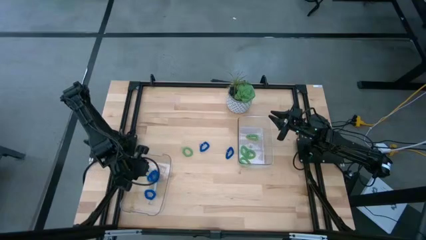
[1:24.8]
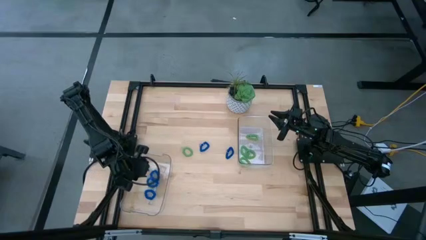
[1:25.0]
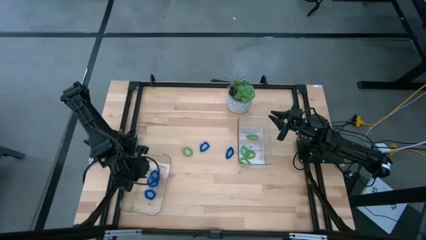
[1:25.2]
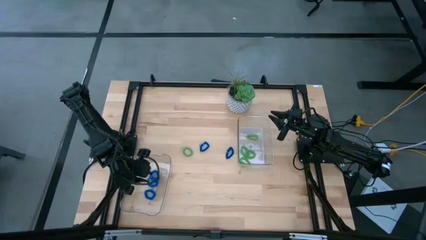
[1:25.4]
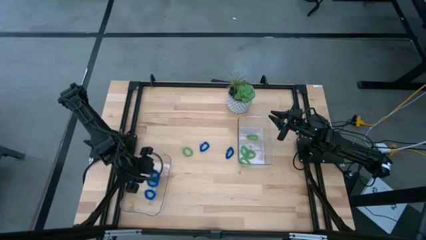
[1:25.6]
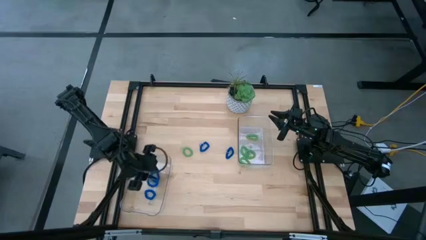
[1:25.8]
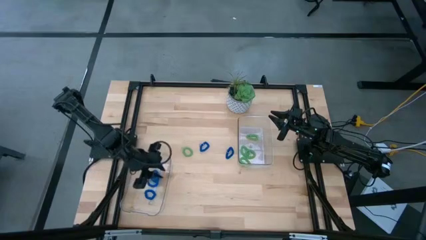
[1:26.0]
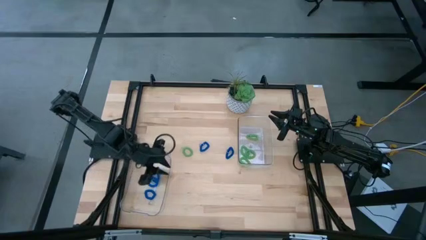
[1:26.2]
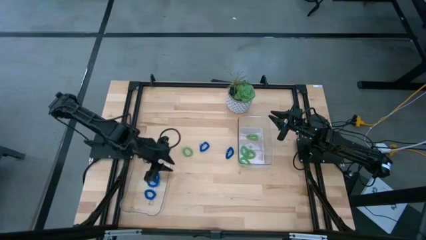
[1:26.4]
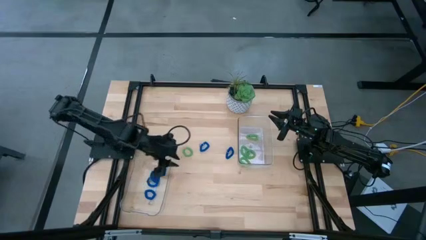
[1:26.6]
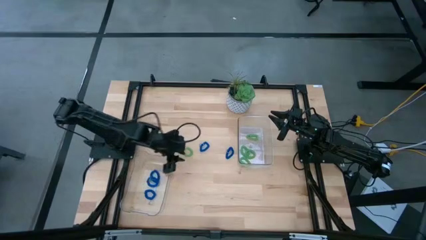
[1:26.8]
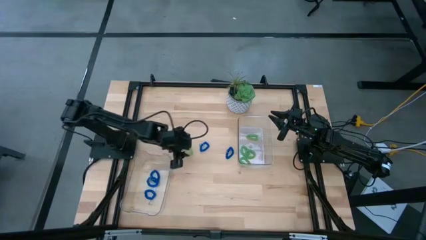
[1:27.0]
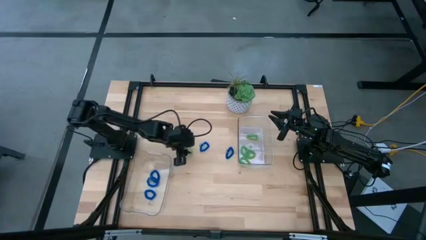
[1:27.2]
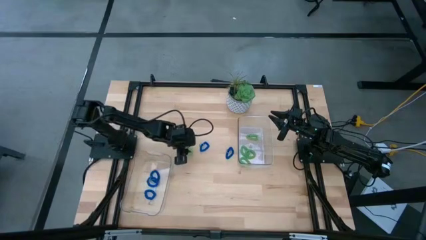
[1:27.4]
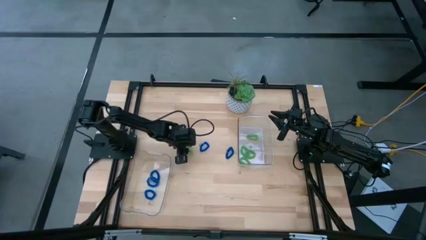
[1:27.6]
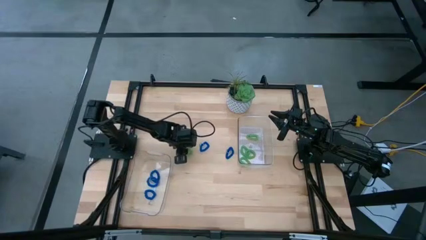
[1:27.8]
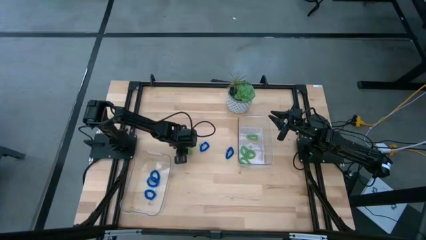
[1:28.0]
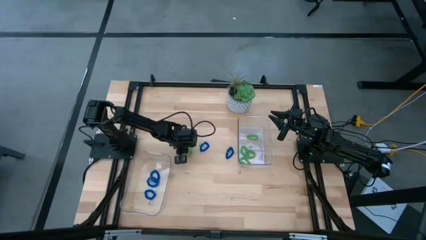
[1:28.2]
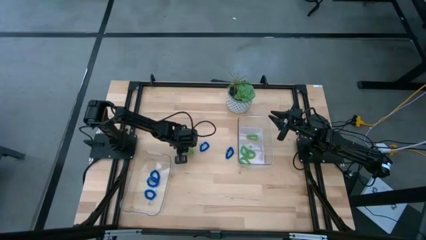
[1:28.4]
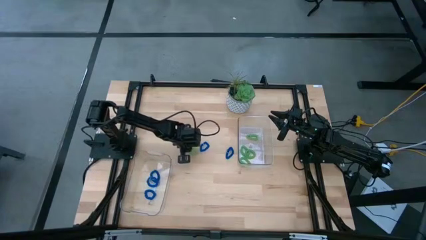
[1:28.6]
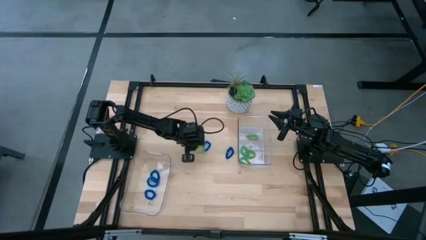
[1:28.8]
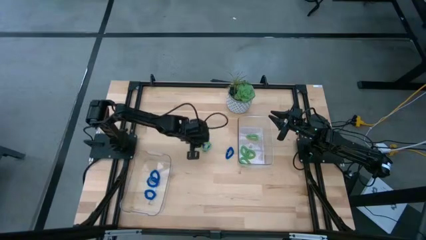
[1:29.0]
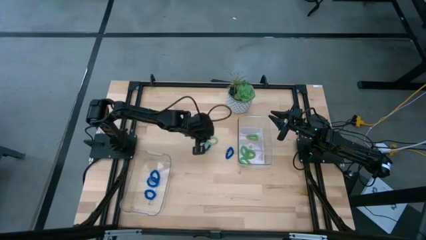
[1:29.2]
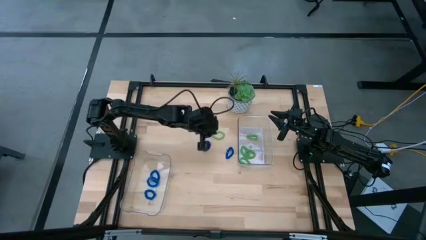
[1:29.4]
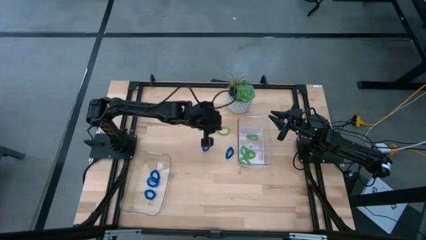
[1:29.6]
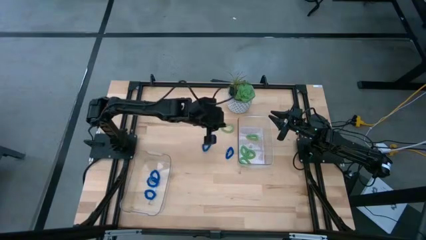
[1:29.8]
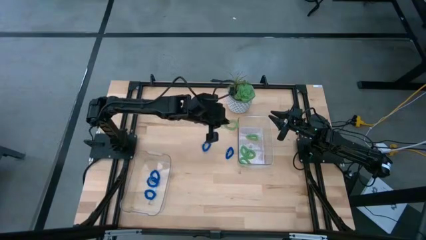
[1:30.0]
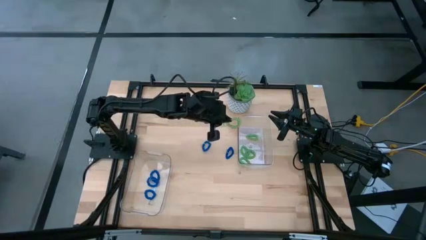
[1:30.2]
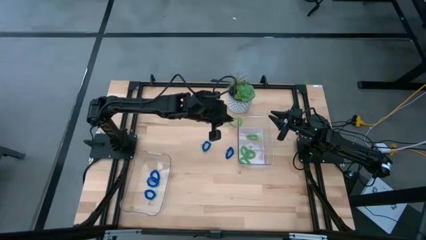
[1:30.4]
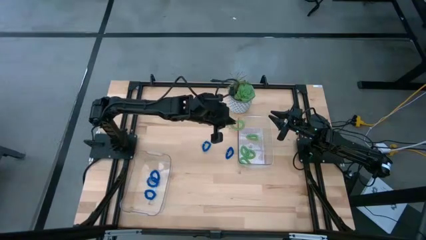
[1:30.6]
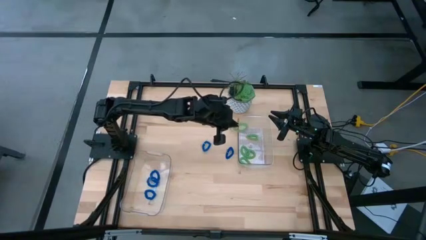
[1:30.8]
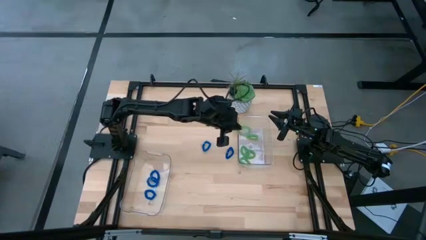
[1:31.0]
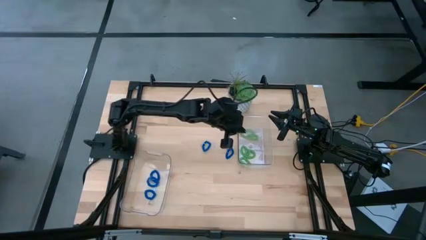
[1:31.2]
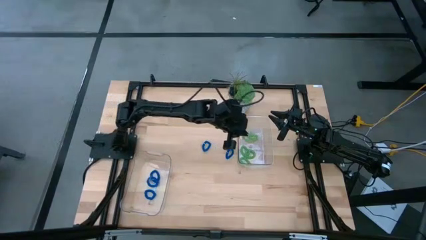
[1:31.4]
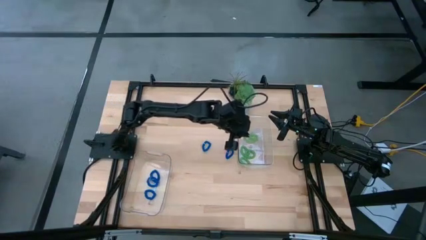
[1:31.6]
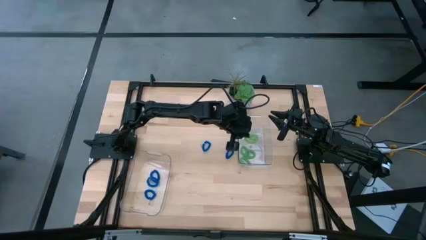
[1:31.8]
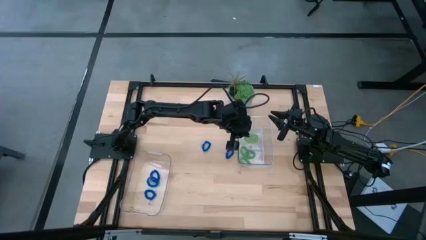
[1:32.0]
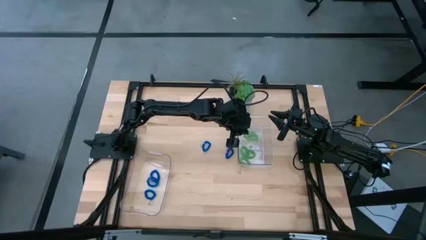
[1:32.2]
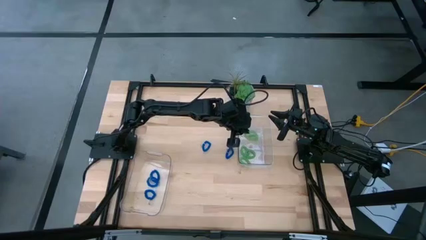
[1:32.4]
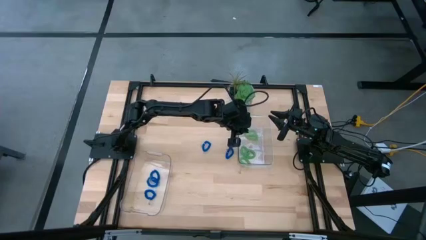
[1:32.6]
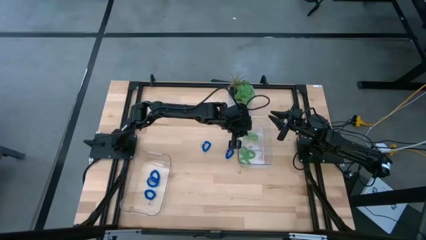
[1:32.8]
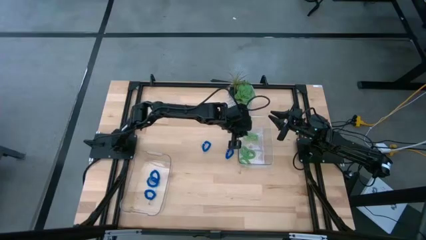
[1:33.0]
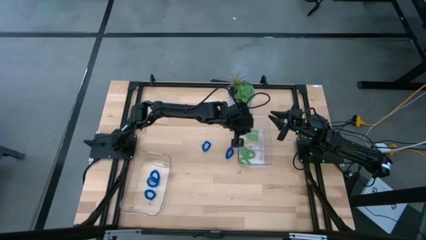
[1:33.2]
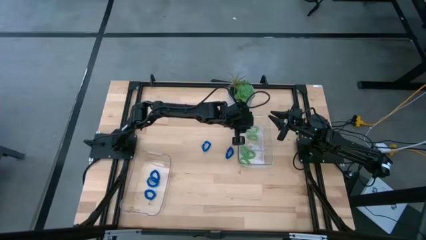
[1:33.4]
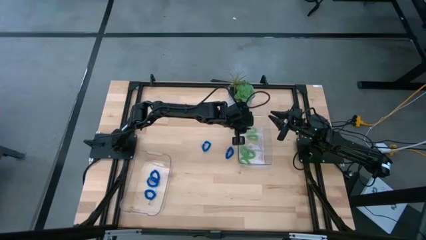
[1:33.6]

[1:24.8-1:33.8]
Task: Sort spring keychains
Put the green spring keychain into the top transparent bin

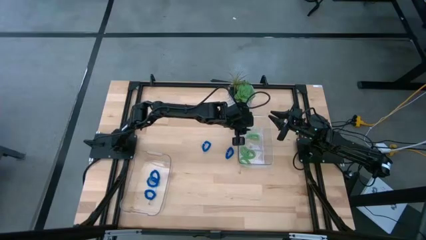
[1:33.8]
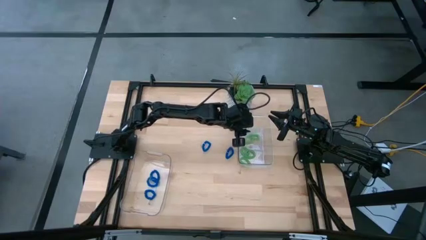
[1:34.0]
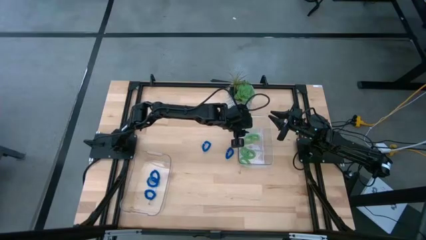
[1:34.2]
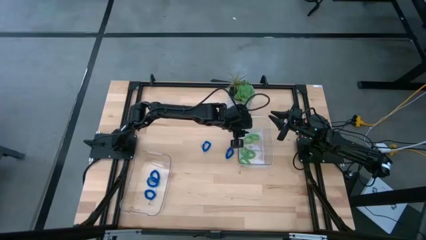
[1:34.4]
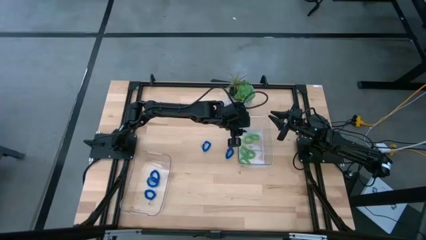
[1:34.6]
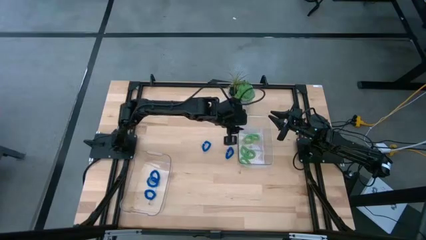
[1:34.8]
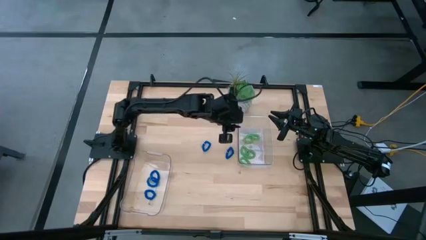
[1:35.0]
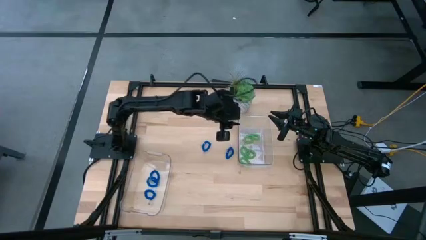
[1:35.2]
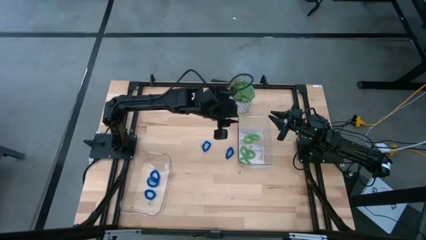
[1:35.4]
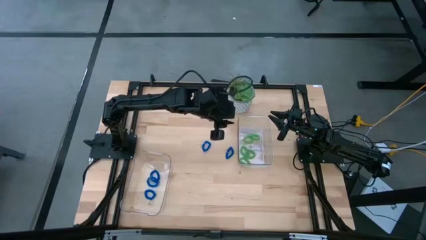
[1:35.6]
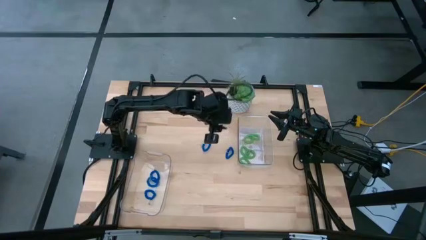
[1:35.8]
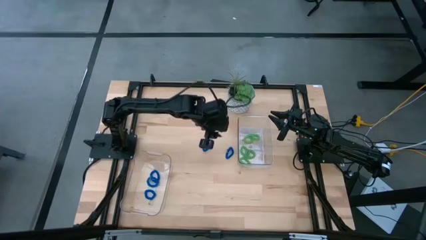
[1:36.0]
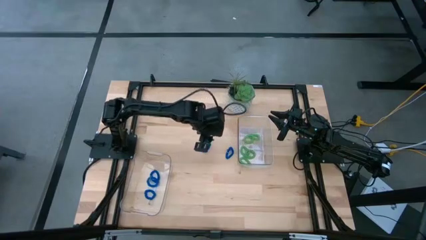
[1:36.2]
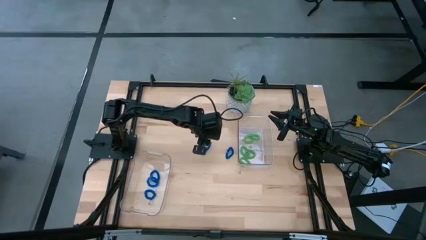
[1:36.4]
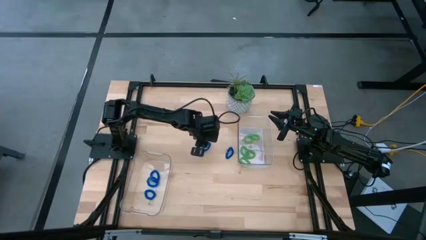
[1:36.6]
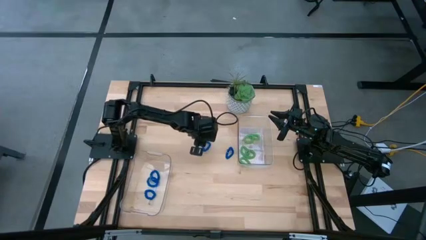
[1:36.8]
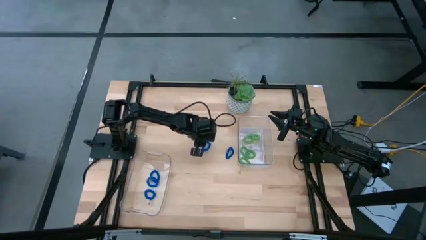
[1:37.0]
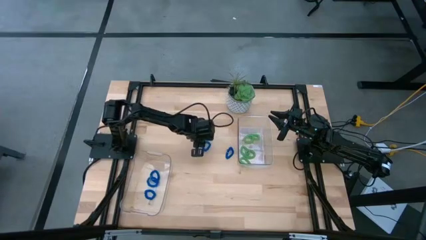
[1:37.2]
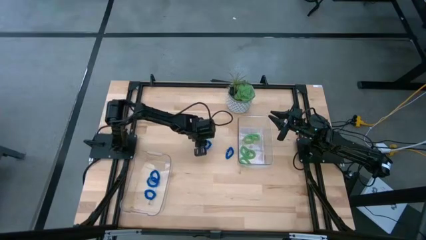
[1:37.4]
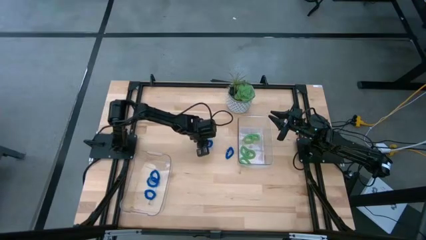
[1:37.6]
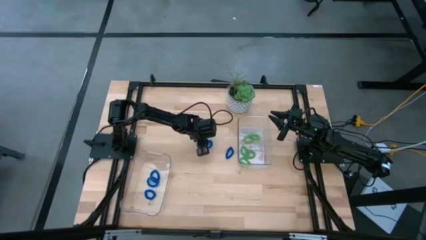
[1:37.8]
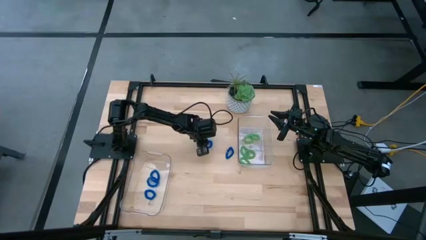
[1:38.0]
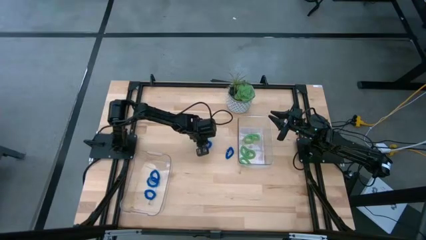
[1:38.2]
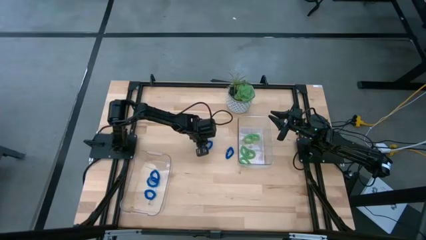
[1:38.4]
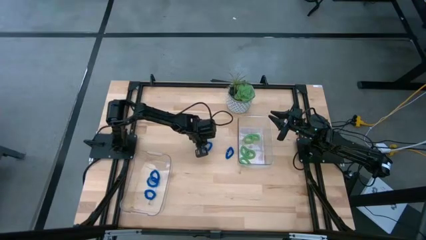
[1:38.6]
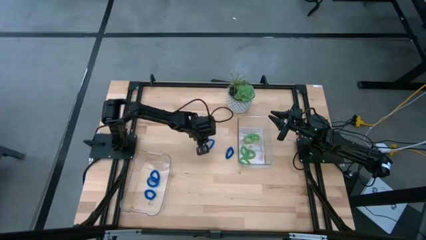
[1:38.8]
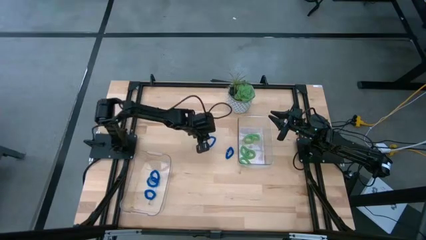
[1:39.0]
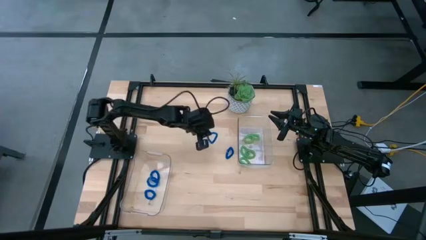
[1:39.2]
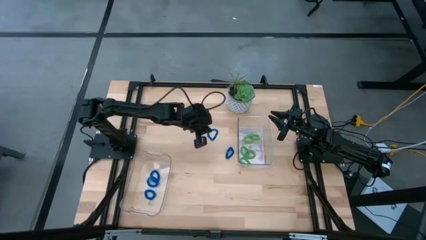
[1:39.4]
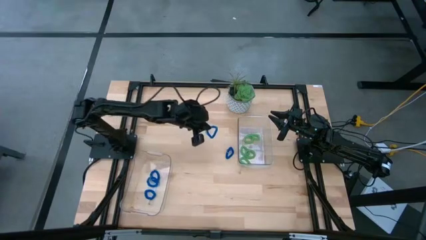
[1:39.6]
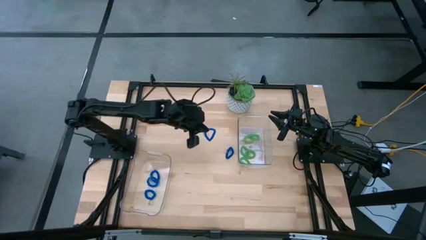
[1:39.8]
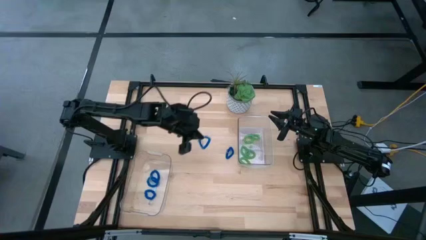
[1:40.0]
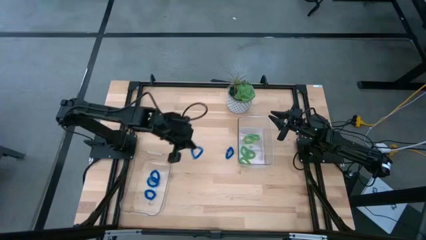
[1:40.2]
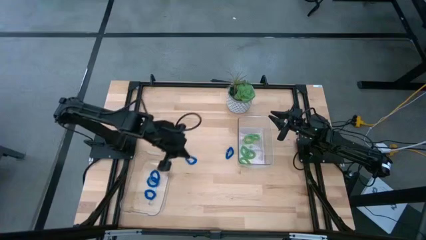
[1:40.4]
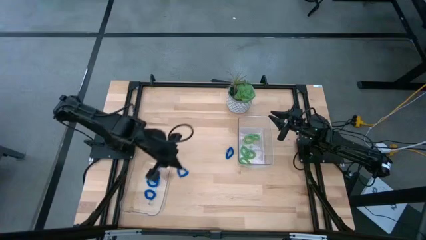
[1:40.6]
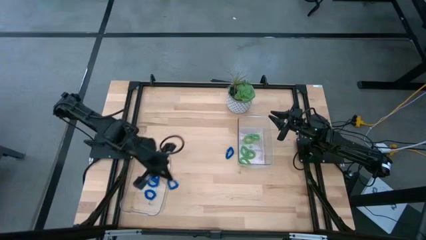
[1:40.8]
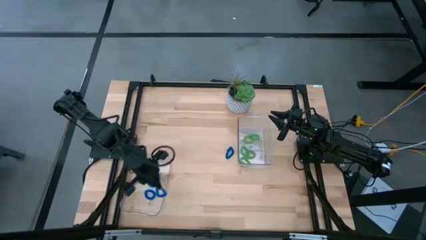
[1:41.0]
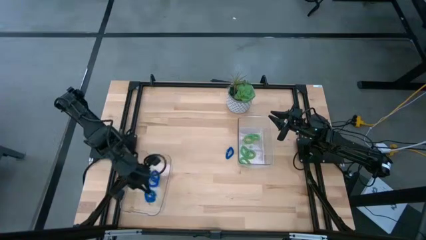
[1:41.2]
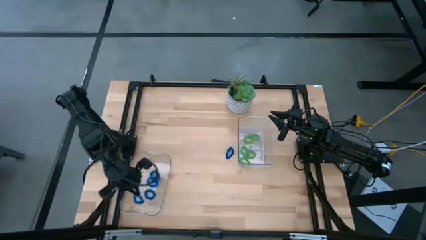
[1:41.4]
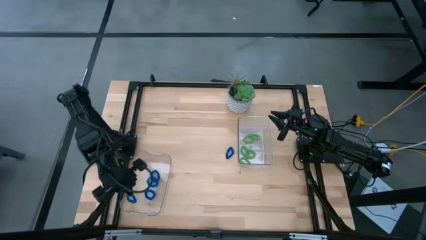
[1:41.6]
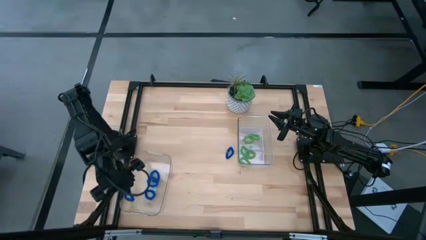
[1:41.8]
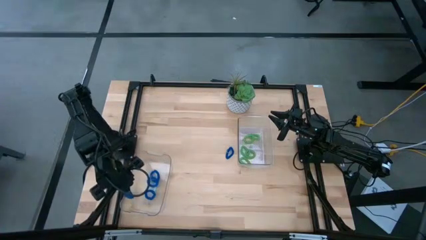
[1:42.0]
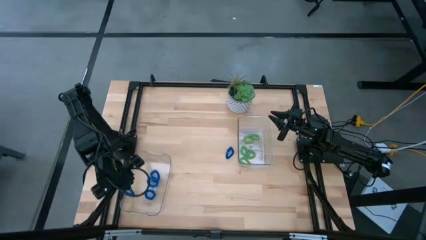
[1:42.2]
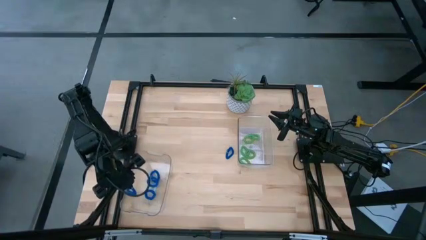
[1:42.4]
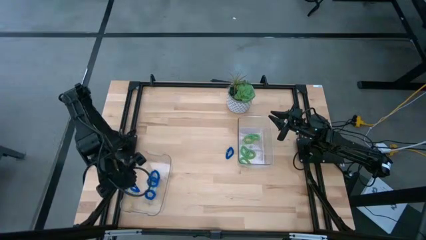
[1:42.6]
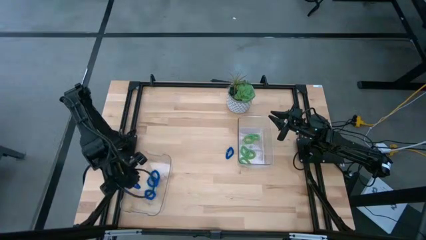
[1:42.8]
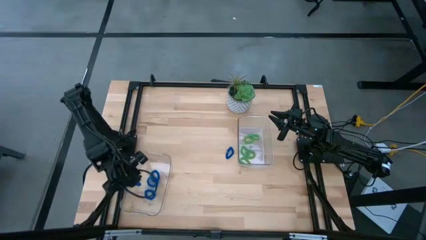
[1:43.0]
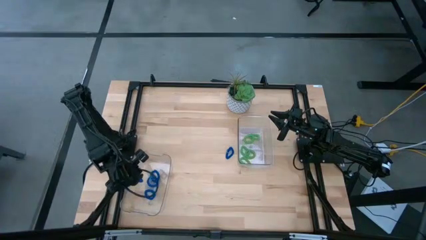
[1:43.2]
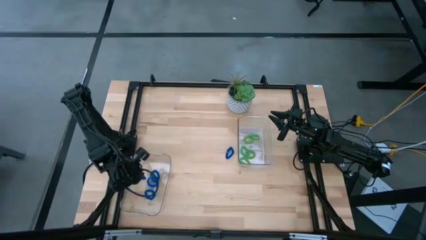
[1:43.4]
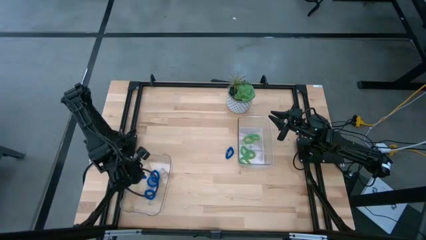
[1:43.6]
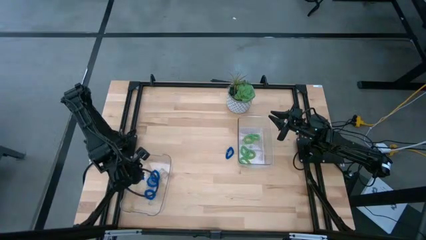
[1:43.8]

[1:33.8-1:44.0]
Put the blue spring keychain into the bottom transparent bin
